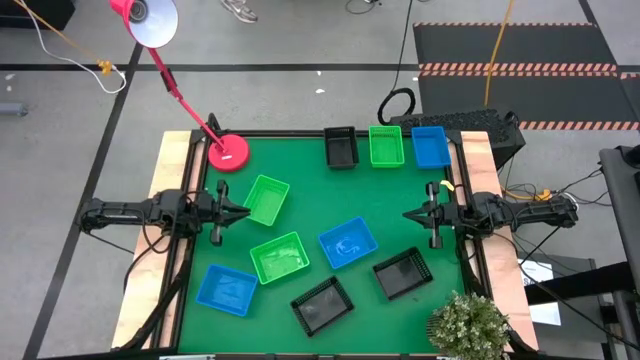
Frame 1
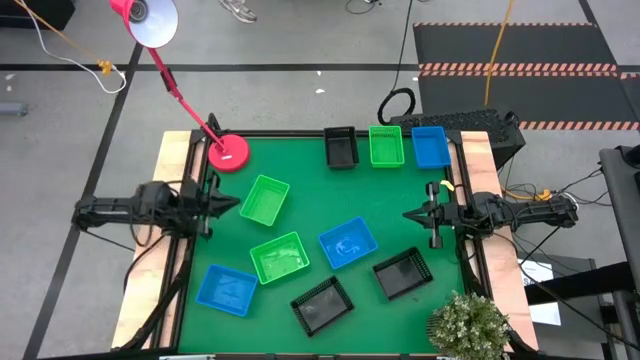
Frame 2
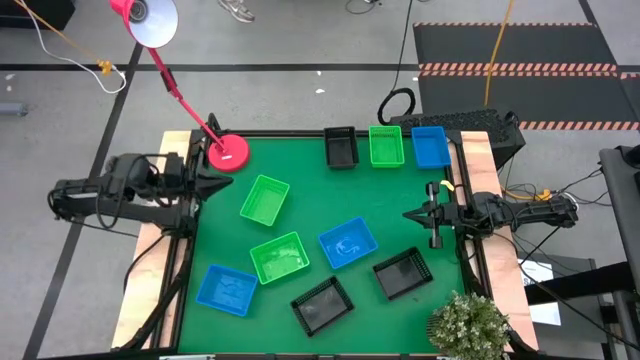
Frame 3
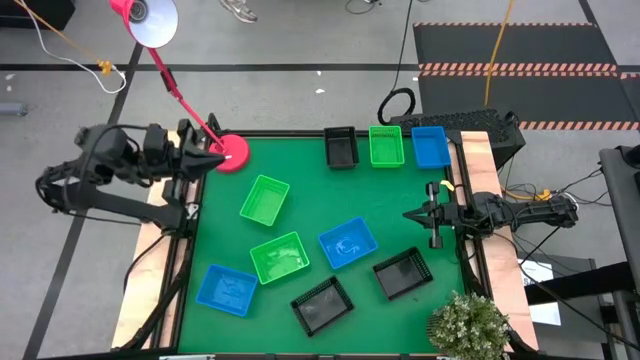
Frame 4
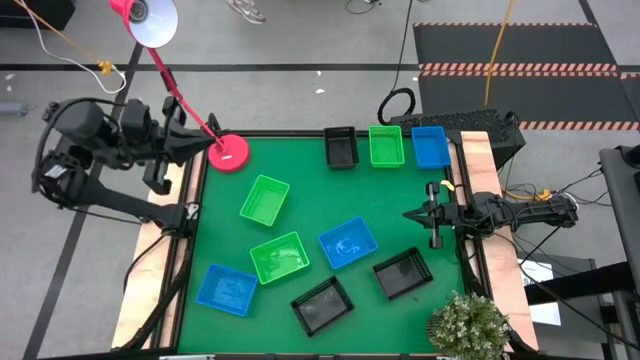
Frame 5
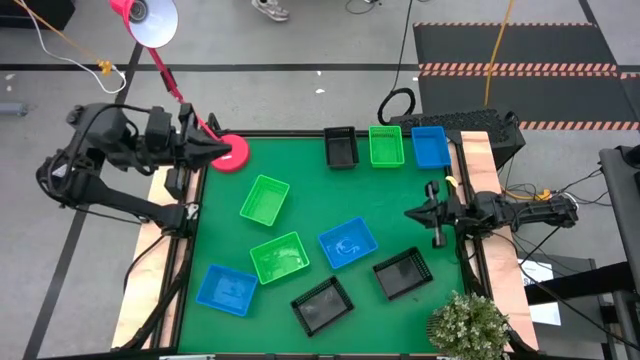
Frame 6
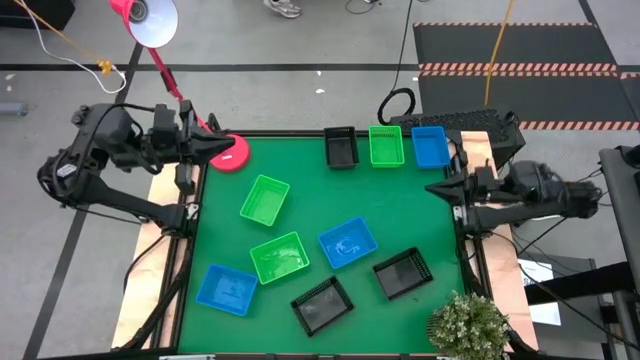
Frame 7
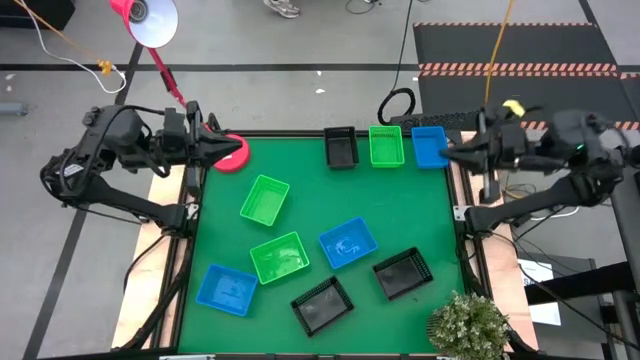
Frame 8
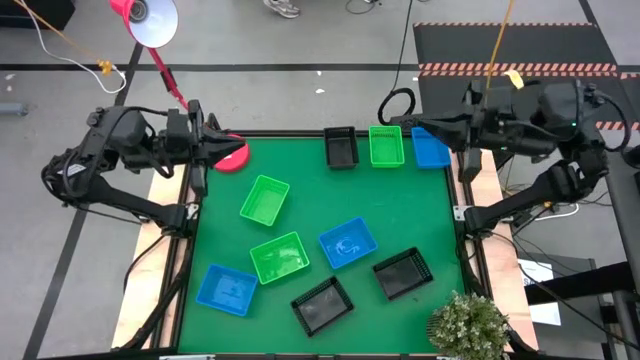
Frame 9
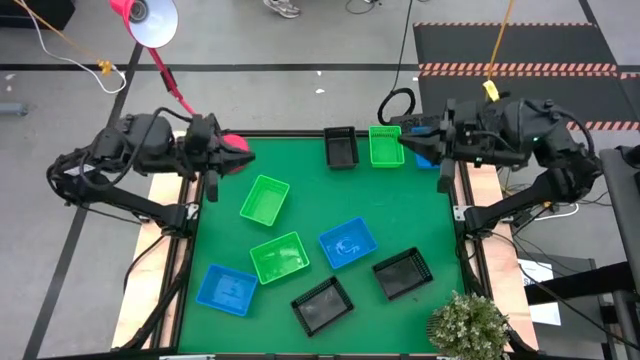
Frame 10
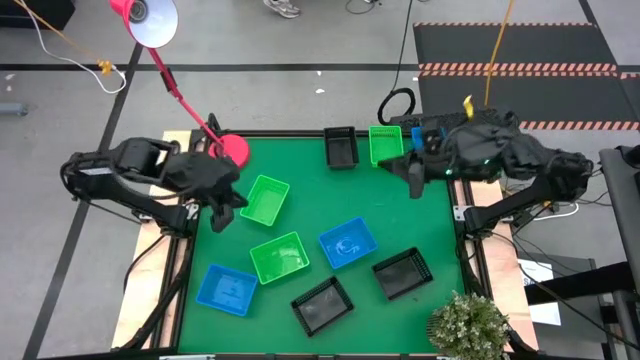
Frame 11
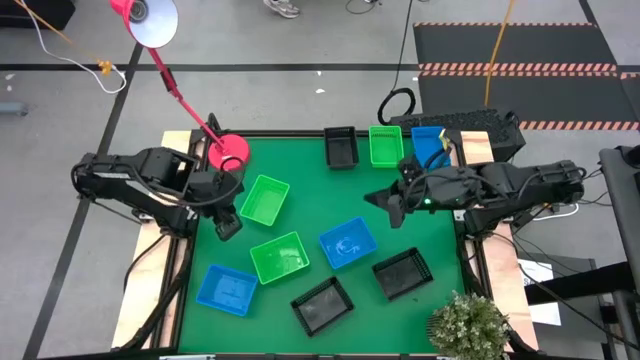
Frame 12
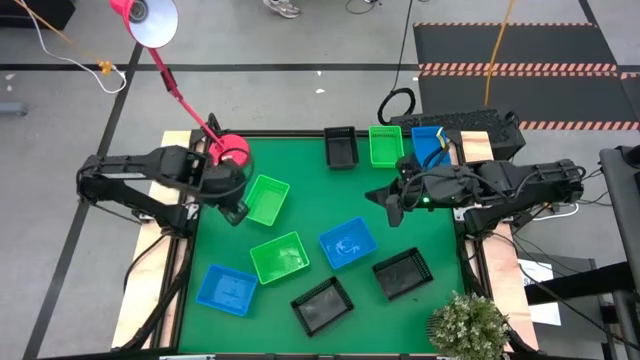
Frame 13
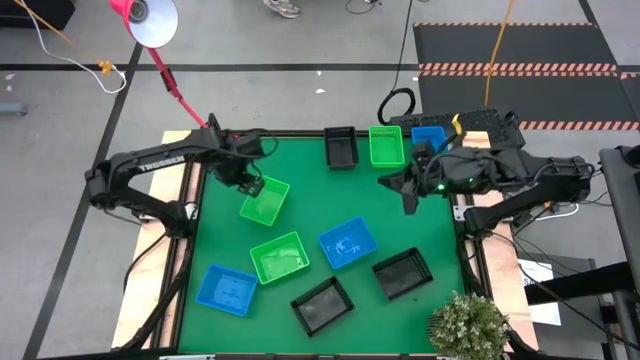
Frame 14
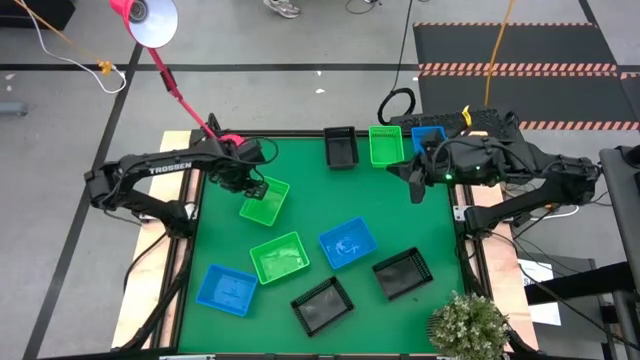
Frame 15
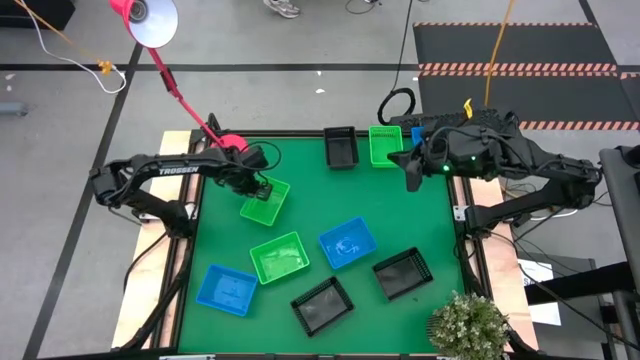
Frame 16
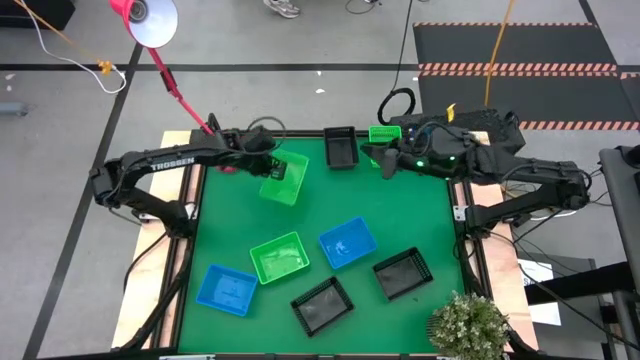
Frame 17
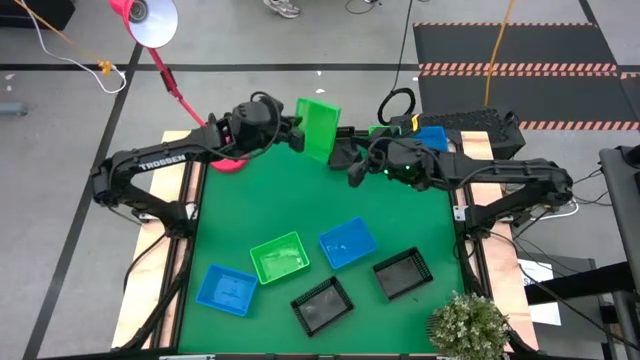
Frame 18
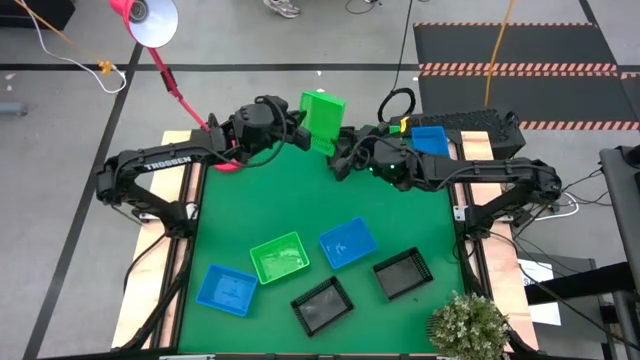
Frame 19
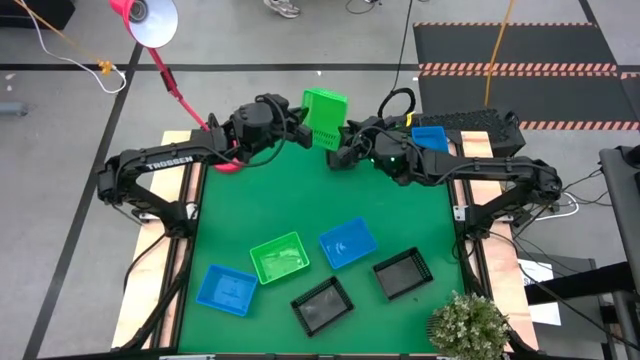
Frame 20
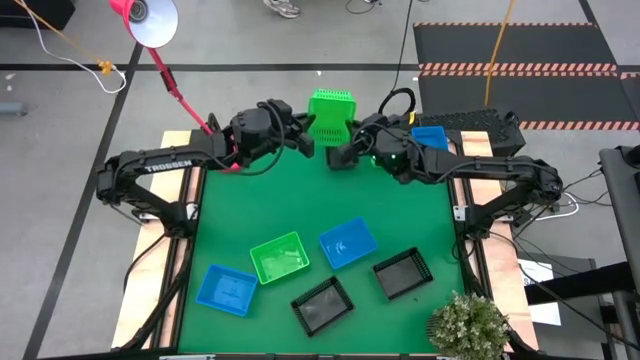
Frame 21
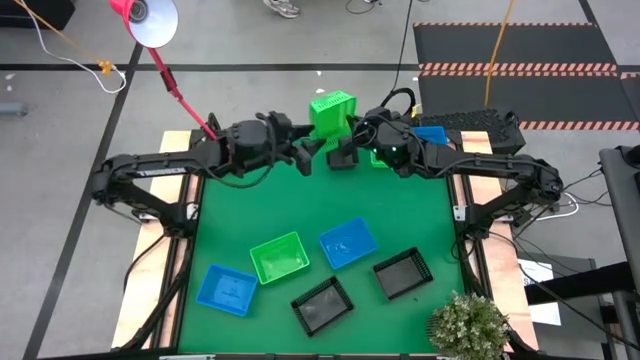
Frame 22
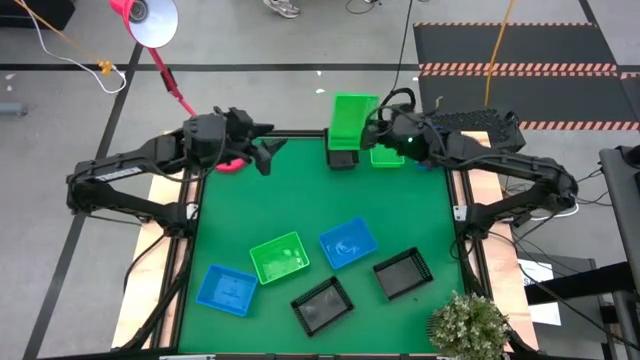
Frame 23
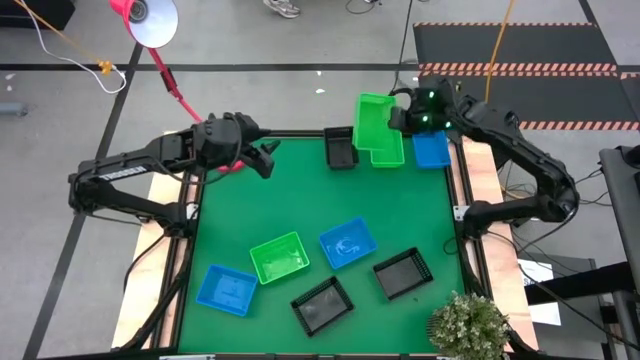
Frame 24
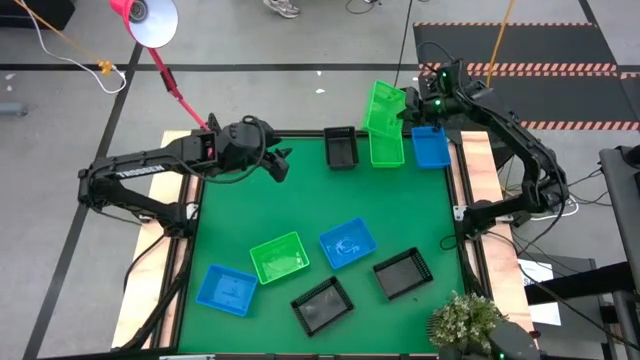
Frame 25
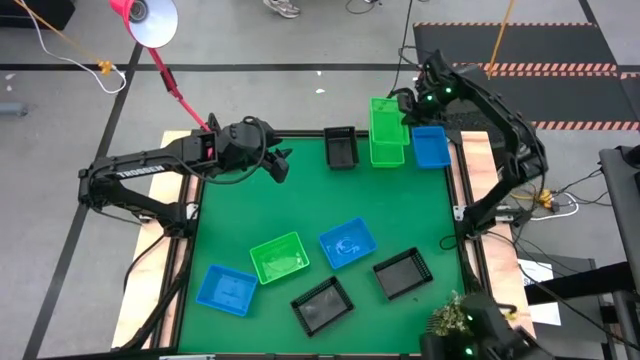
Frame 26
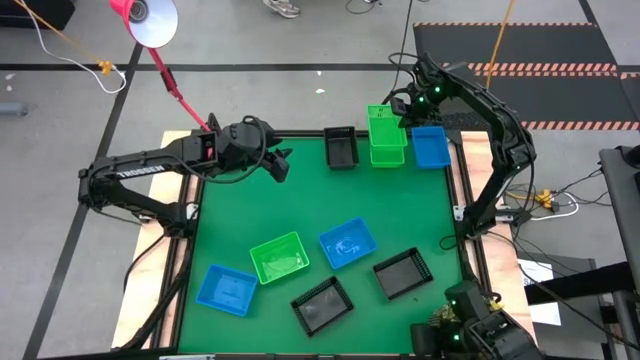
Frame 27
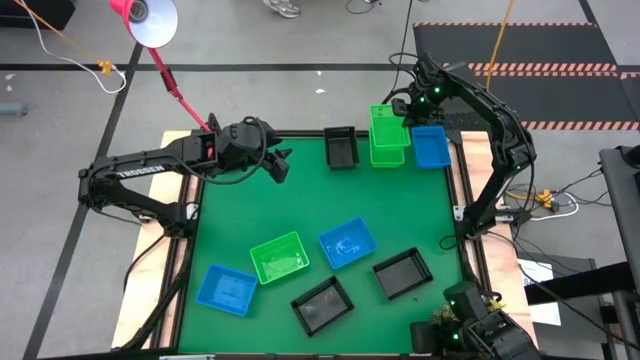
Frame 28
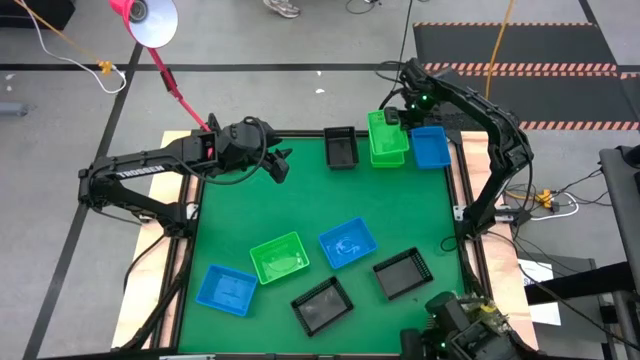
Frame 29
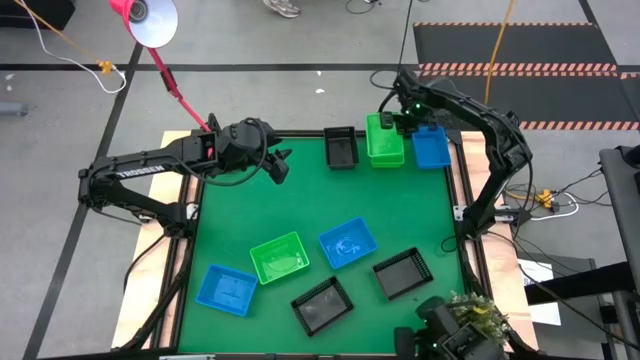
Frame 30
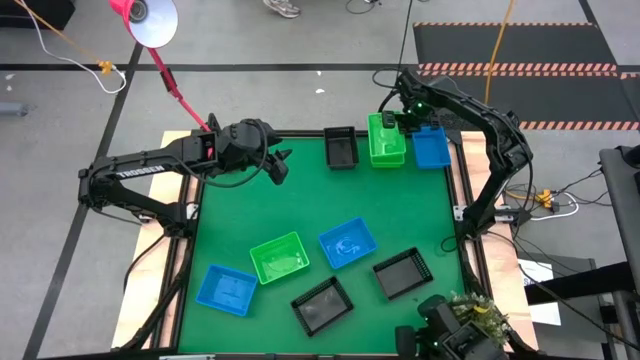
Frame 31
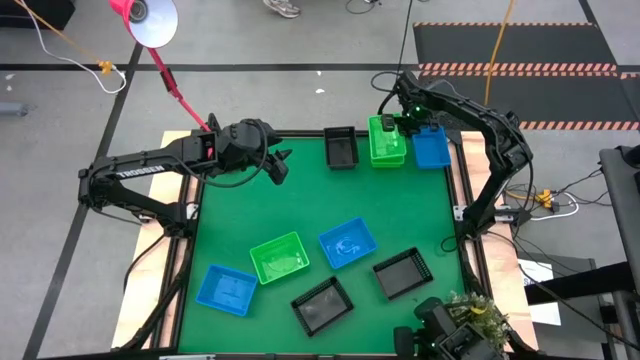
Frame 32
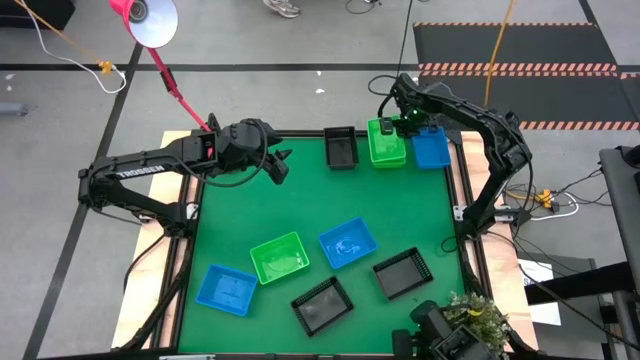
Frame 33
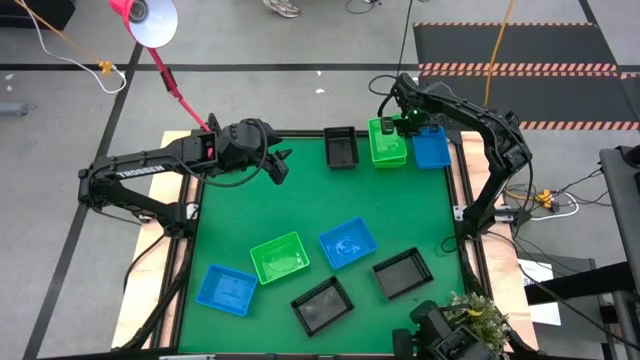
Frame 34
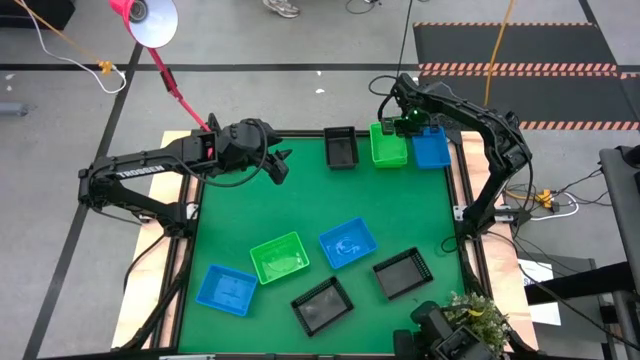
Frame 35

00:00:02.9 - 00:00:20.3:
Stack the middle green bin on the top green bin
